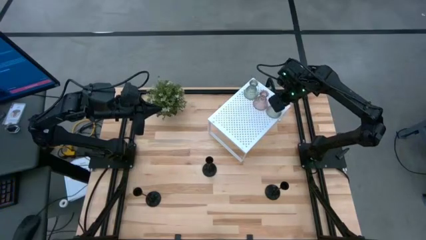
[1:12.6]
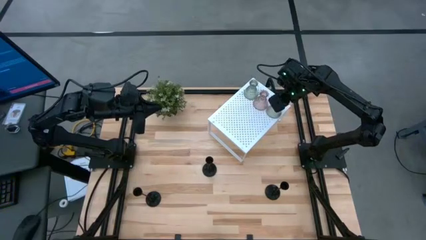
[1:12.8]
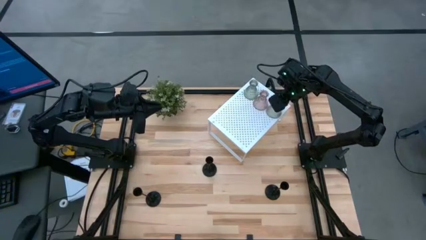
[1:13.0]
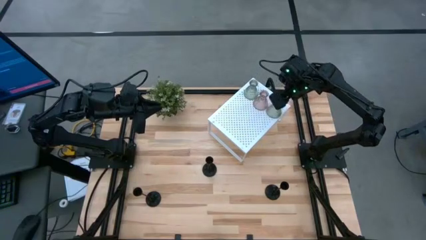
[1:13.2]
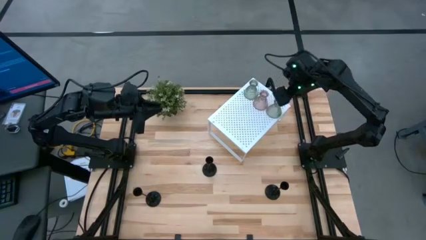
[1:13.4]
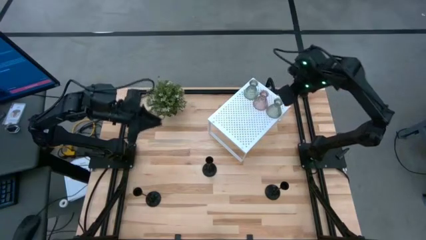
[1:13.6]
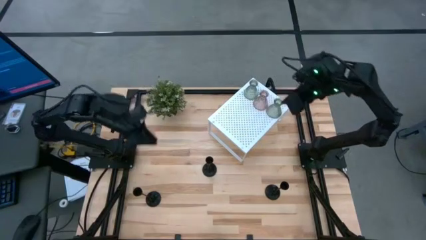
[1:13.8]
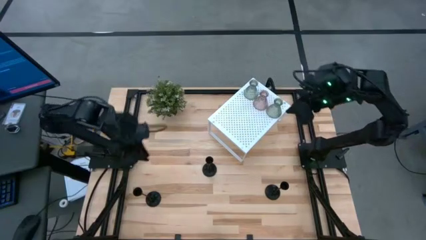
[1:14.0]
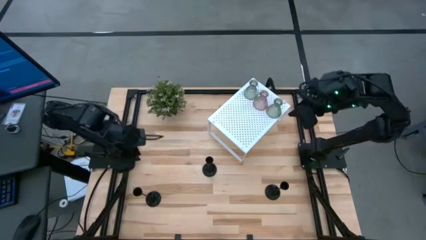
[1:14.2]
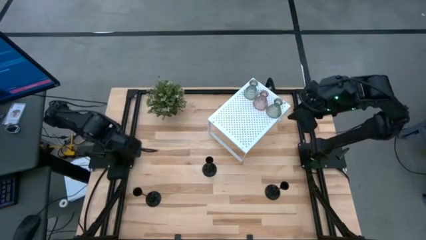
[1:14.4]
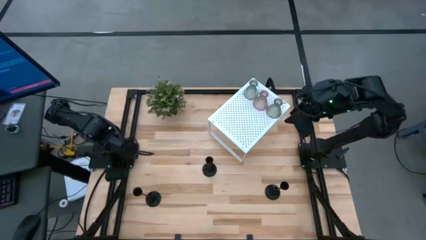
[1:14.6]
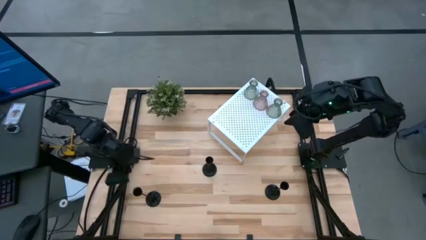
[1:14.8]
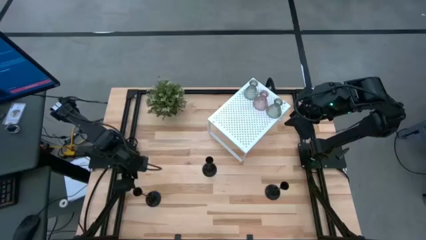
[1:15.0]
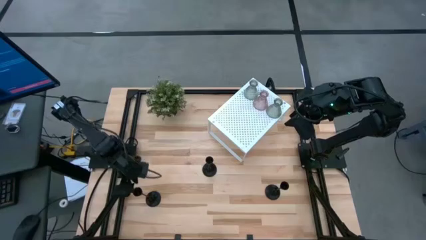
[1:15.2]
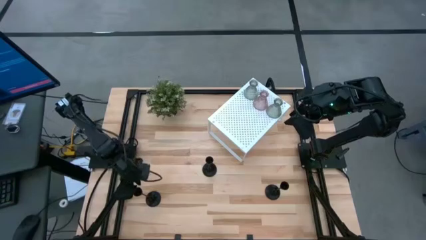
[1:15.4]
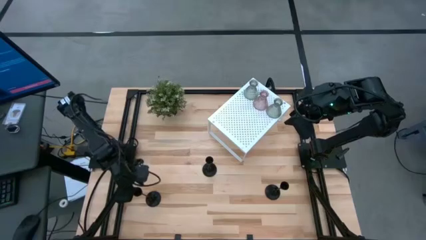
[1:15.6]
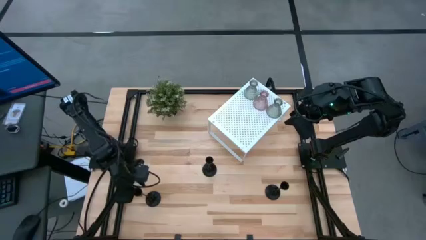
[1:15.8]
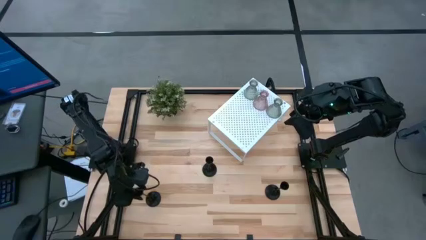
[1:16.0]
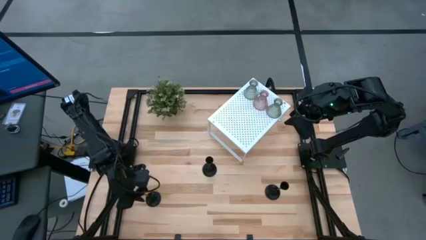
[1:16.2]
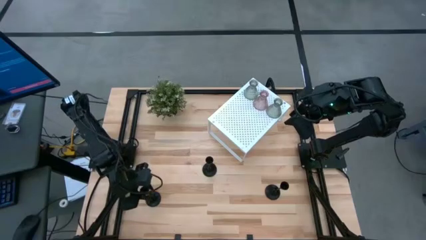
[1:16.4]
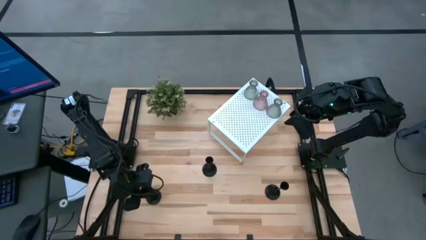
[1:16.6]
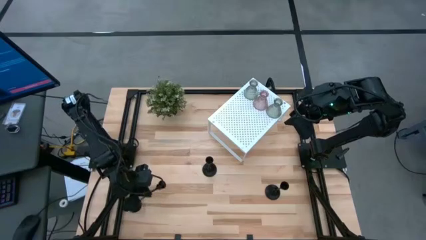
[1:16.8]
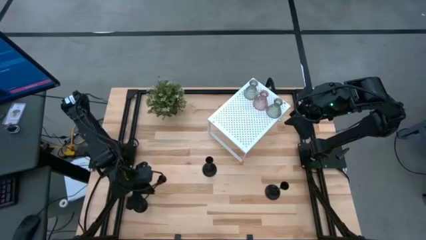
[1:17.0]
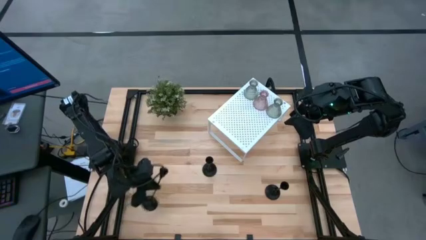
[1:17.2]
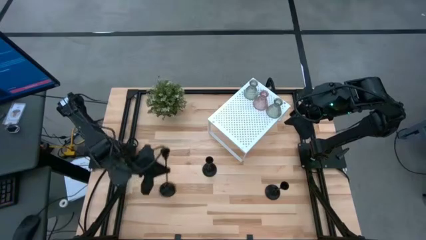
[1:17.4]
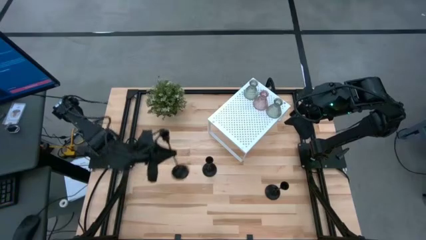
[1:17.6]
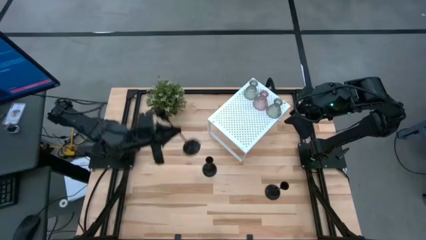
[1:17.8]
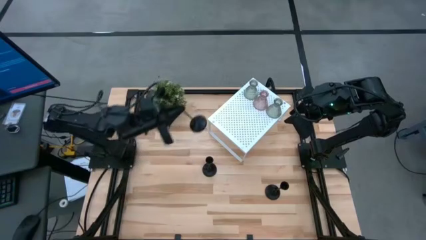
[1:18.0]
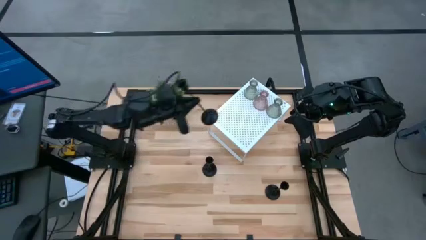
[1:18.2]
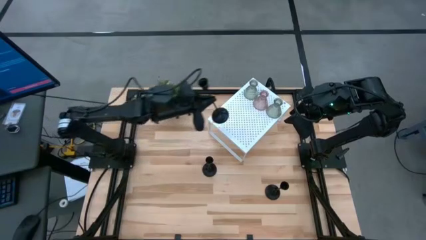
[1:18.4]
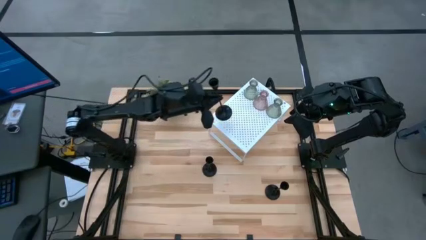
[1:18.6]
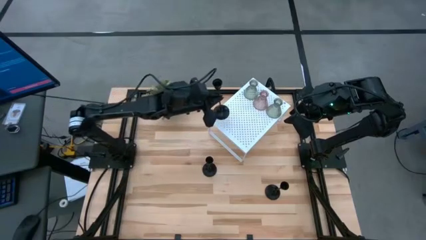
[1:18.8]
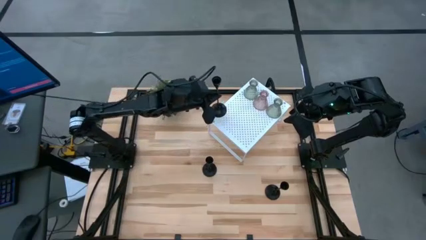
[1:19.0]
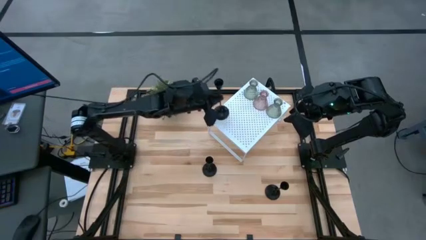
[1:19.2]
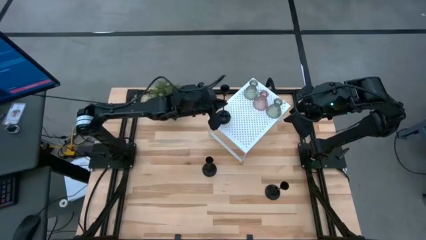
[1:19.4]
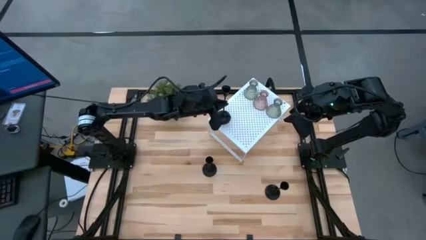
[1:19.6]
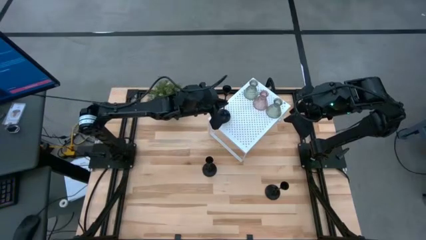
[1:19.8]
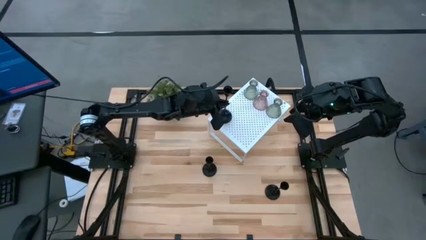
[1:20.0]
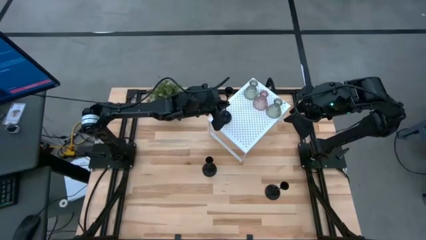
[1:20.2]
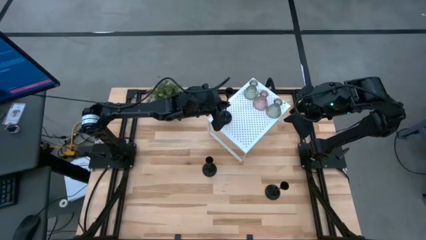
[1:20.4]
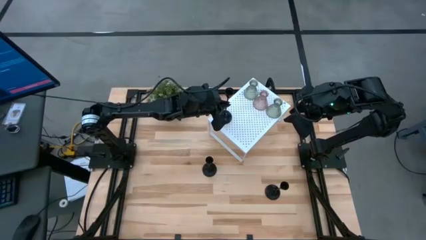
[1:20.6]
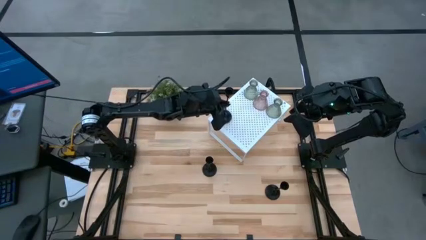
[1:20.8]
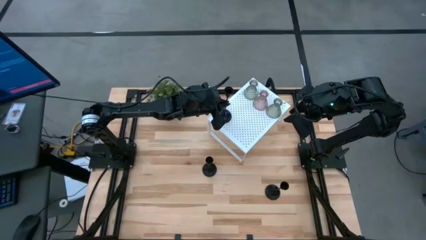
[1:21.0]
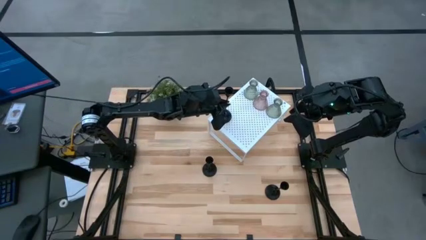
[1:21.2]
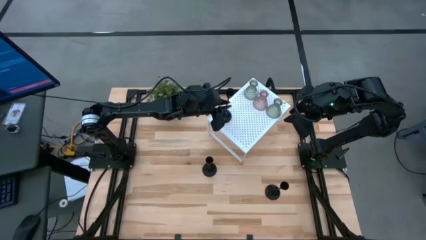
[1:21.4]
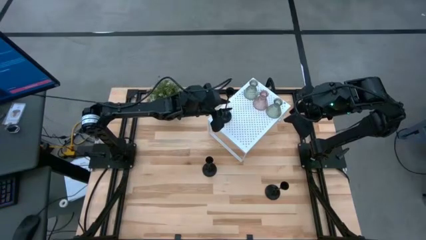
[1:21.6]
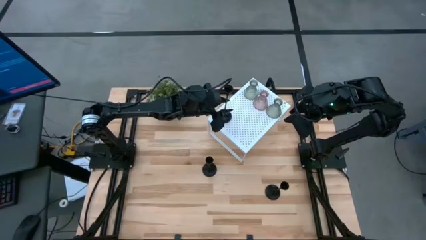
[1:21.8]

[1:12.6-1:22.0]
Task: Pick & Place candle stick holders
Put the bottom left black candle holder on the shelf

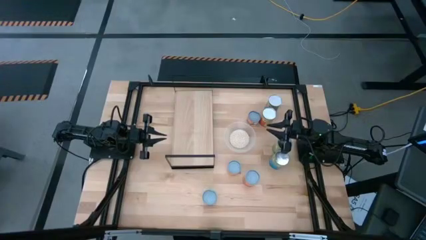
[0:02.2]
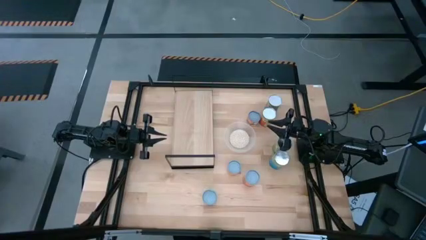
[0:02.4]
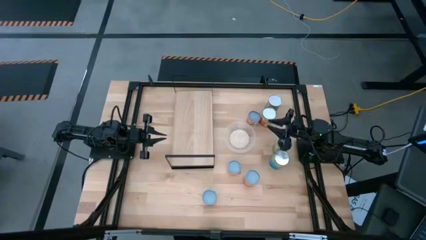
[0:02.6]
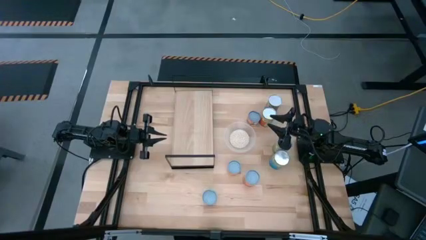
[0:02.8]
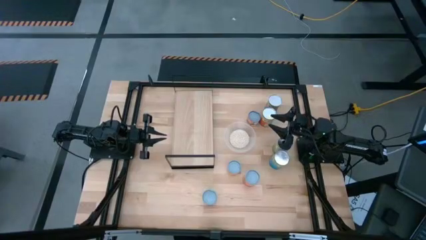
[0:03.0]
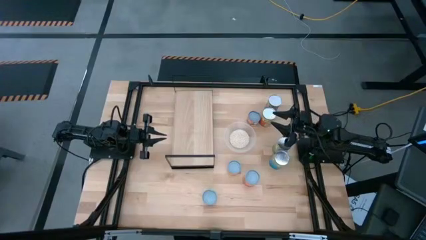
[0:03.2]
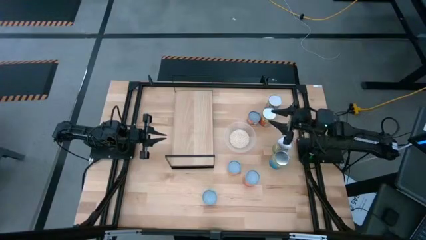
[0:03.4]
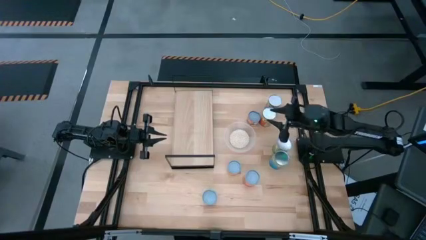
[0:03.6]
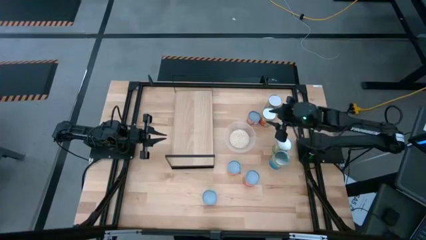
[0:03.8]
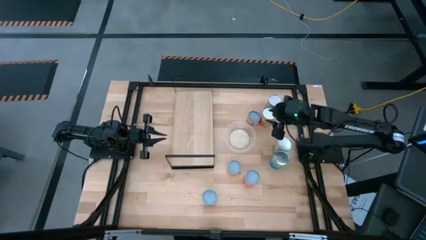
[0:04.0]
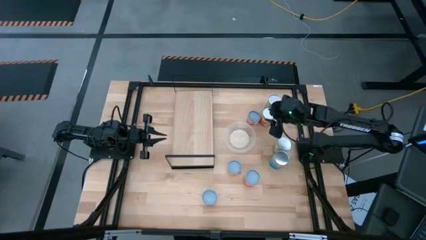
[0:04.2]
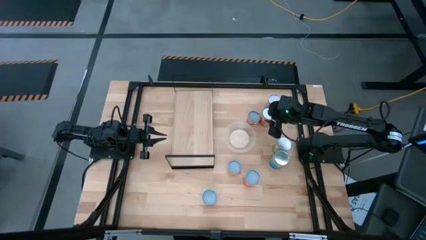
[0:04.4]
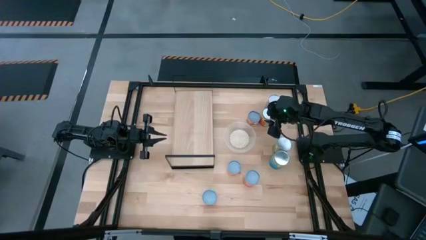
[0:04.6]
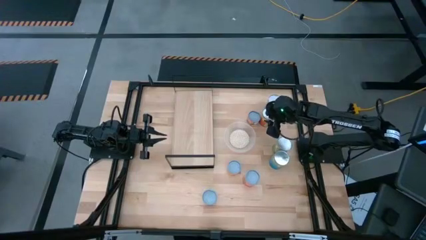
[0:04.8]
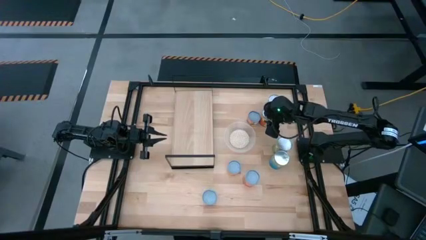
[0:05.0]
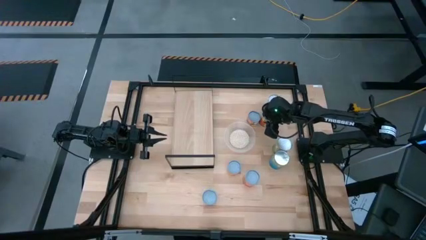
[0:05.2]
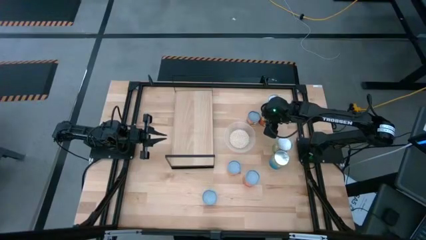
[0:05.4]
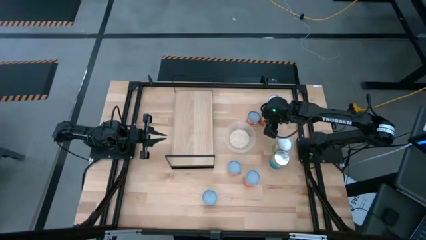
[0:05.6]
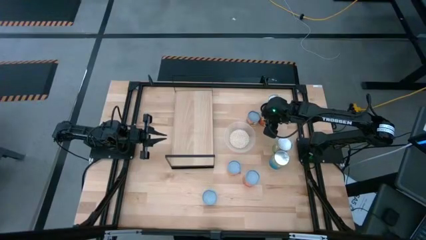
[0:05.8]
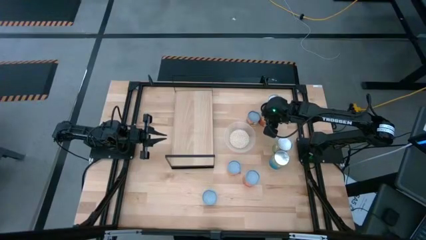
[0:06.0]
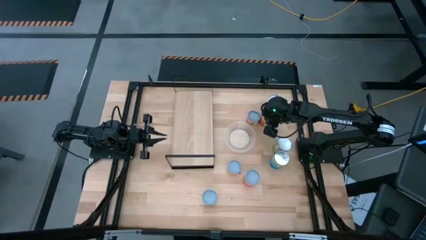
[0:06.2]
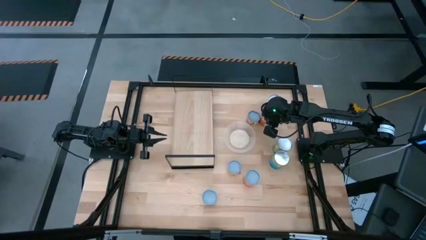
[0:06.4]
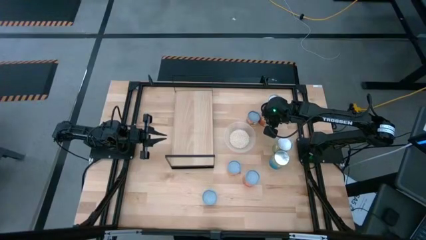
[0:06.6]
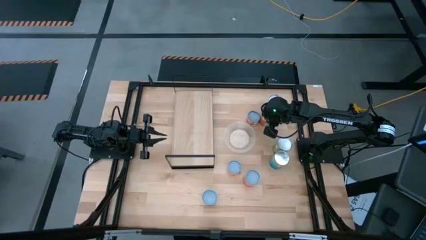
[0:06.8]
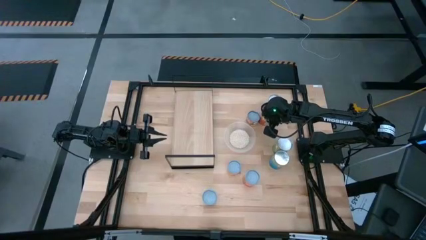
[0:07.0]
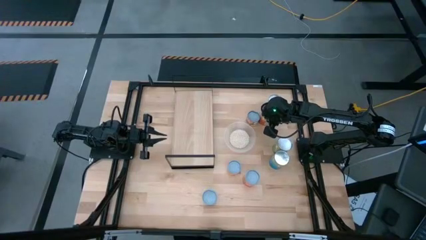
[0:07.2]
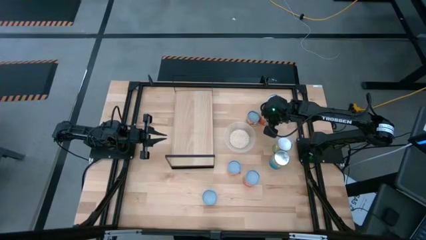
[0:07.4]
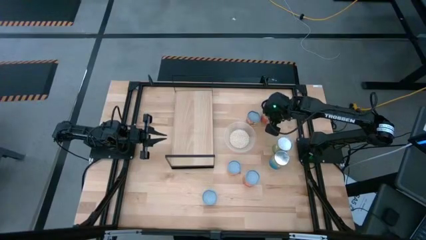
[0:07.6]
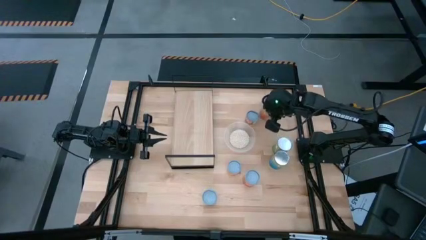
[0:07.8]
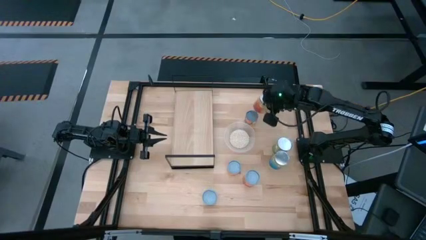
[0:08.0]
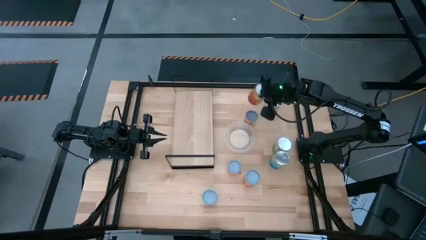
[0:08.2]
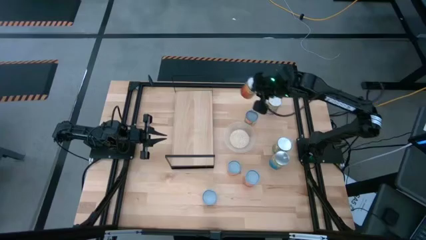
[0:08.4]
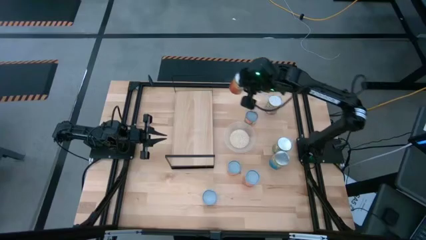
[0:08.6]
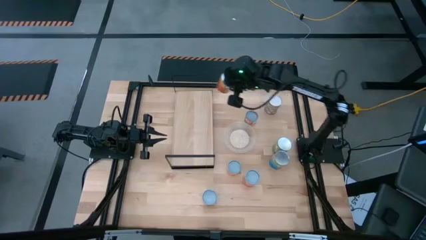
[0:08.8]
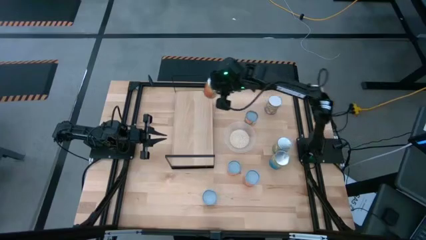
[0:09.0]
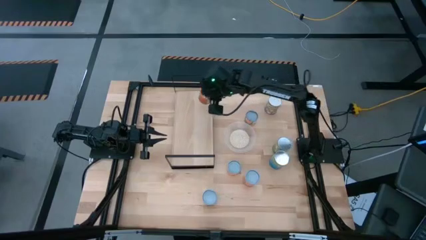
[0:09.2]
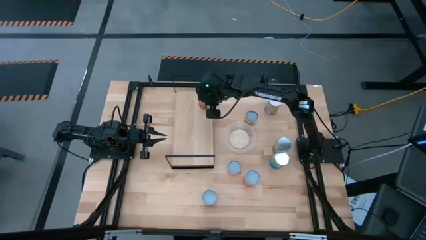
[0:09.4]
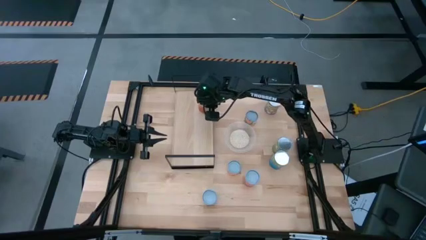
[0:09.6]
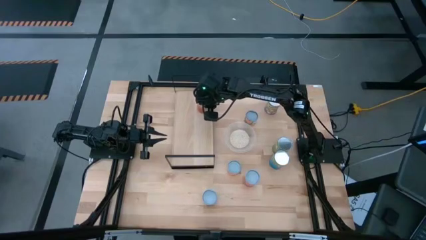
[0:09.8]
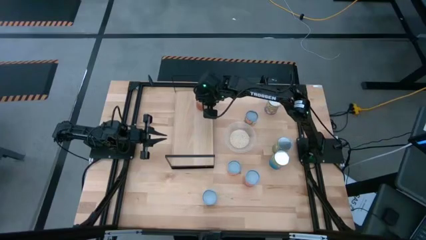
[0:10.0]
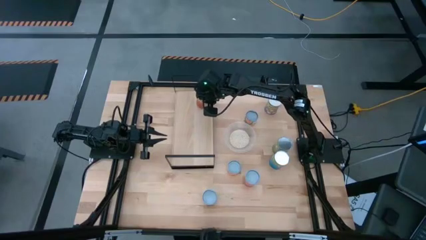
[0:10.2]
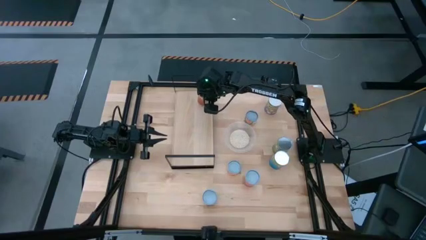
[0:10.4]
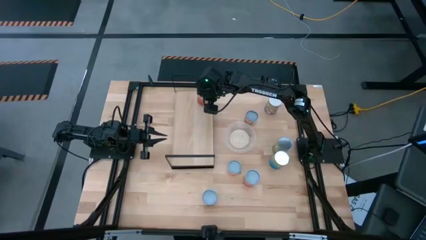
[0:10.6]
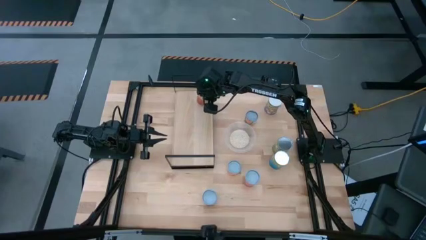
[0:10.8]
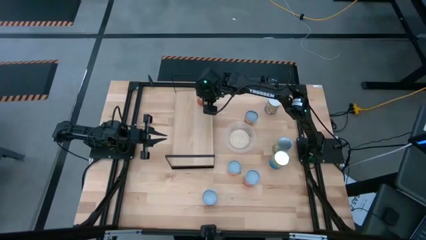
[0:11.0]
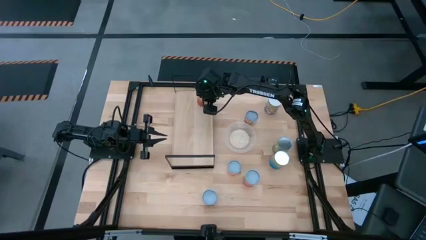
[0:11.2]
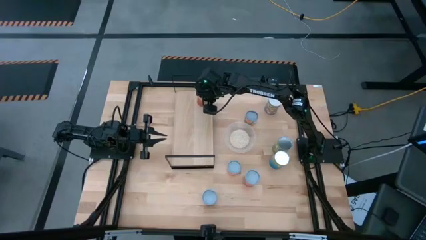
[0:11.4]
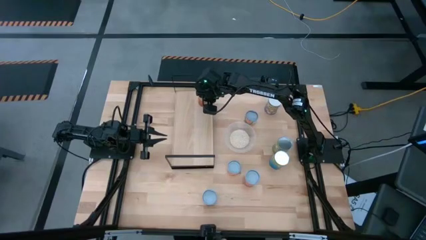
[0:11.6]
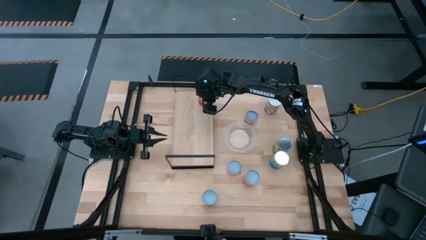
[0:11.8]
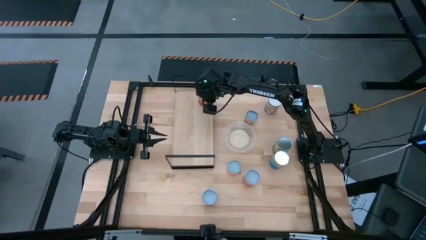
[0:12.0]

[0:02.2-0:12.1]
Task: Pick and place cans onto a shelf
Put the large canned pineapple on the shelf
